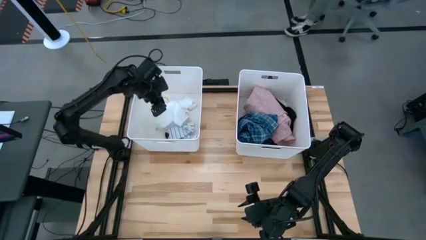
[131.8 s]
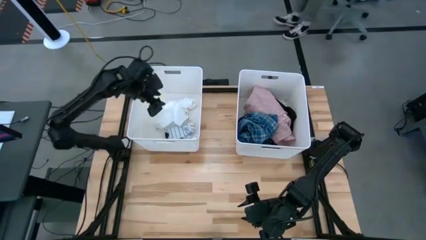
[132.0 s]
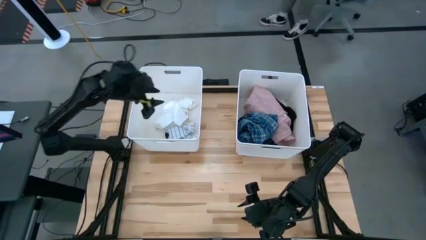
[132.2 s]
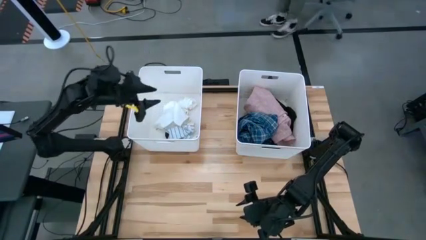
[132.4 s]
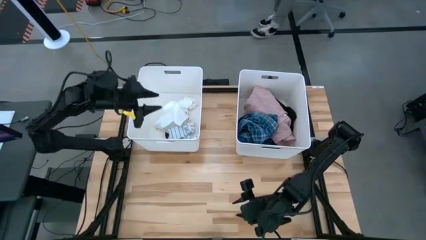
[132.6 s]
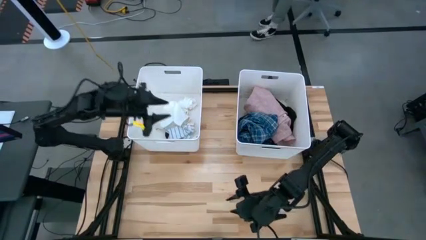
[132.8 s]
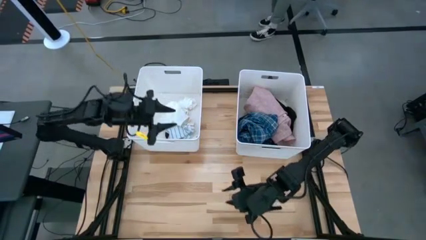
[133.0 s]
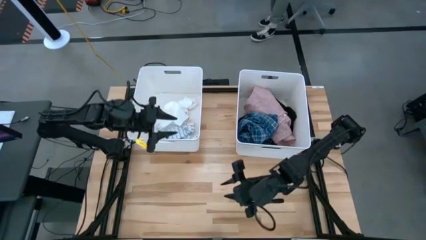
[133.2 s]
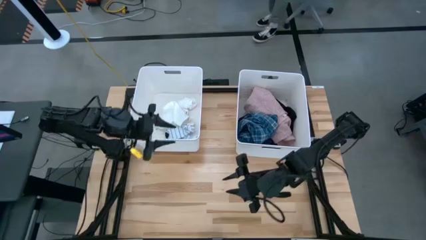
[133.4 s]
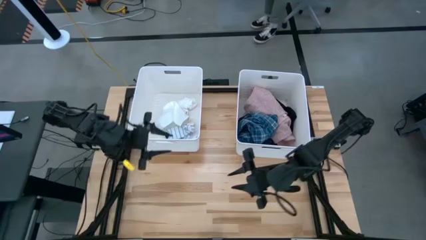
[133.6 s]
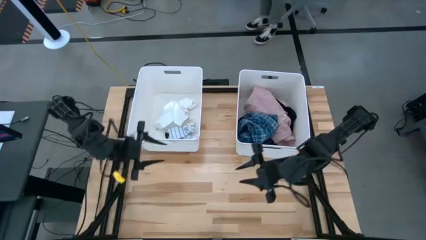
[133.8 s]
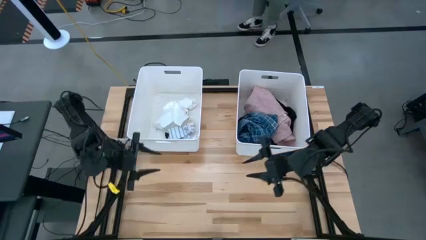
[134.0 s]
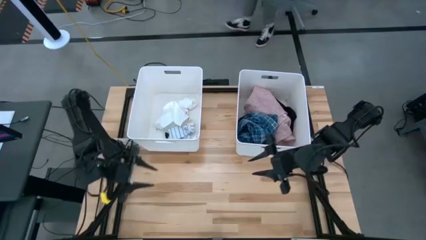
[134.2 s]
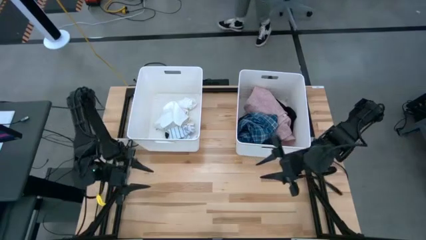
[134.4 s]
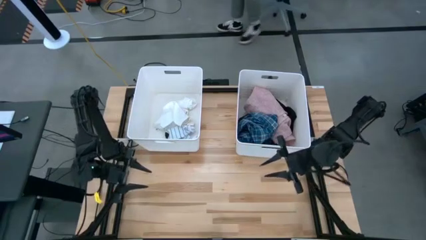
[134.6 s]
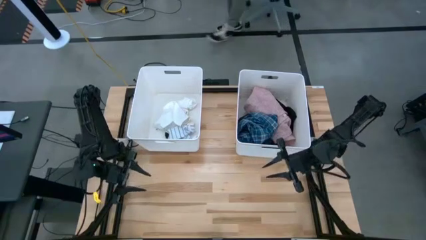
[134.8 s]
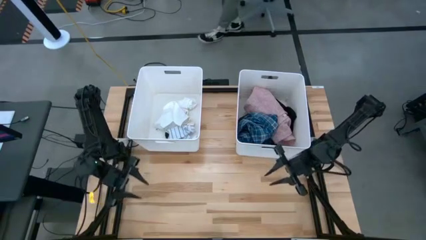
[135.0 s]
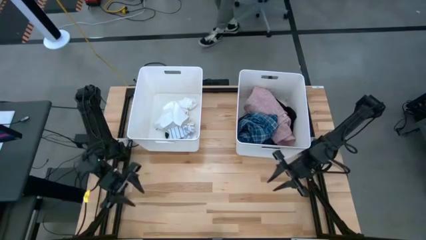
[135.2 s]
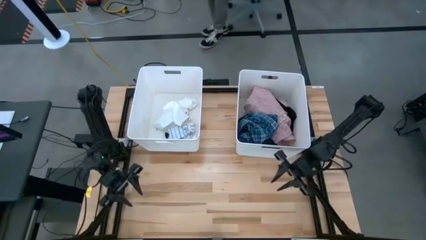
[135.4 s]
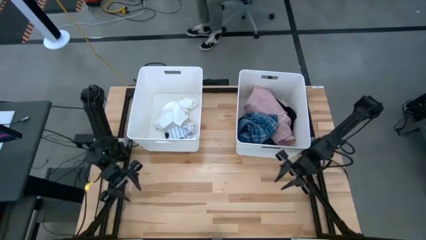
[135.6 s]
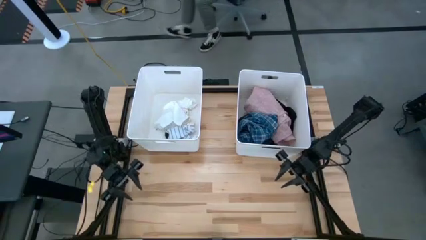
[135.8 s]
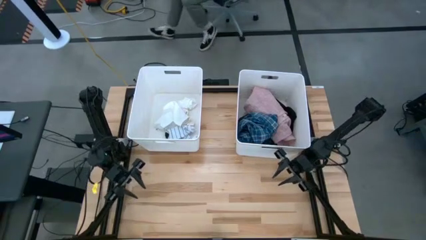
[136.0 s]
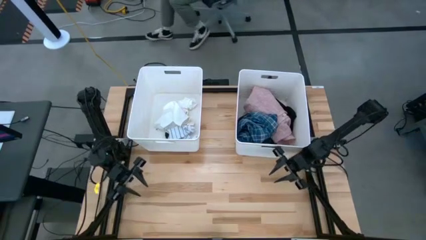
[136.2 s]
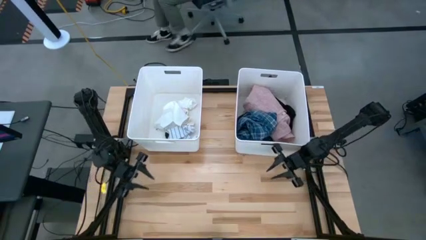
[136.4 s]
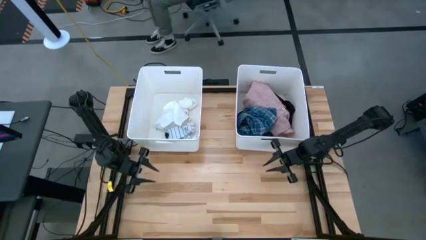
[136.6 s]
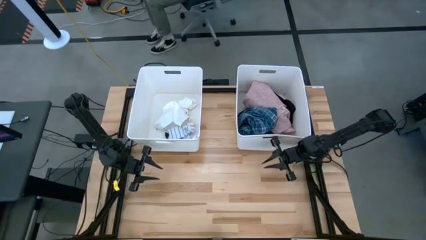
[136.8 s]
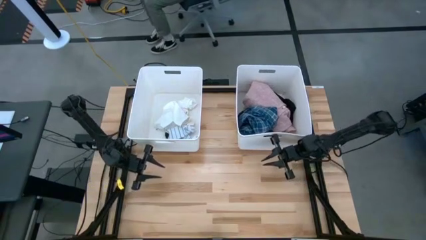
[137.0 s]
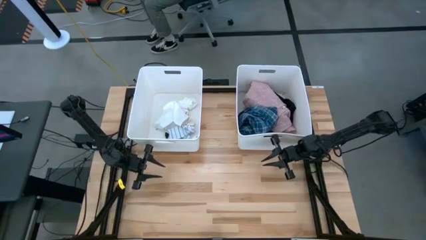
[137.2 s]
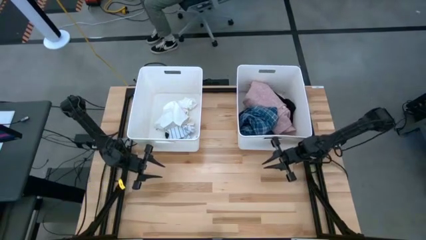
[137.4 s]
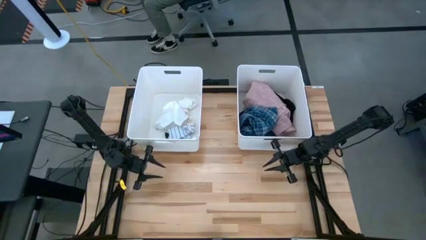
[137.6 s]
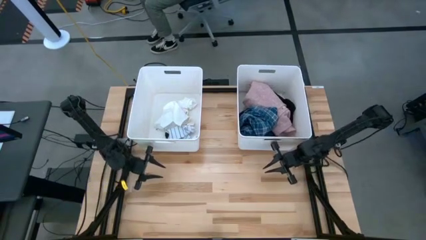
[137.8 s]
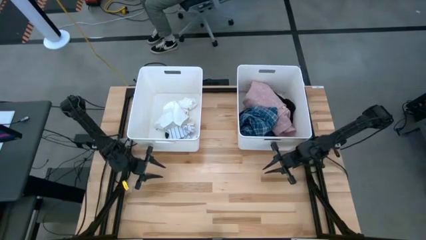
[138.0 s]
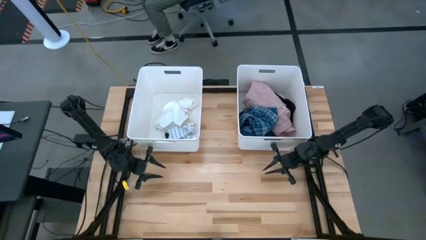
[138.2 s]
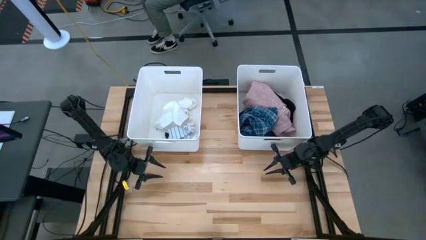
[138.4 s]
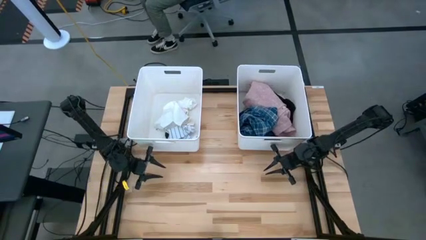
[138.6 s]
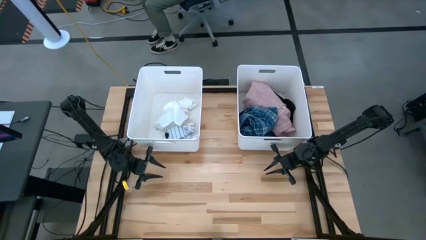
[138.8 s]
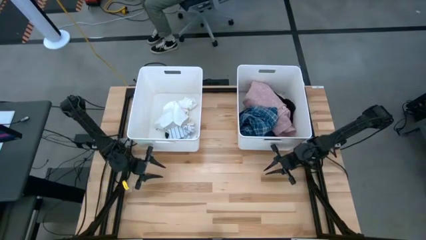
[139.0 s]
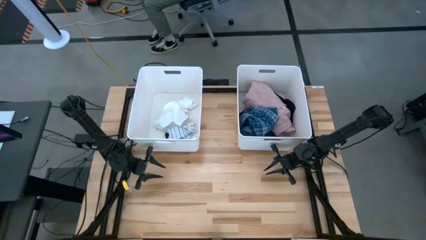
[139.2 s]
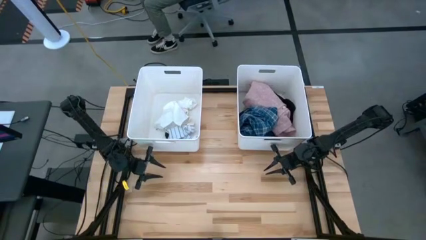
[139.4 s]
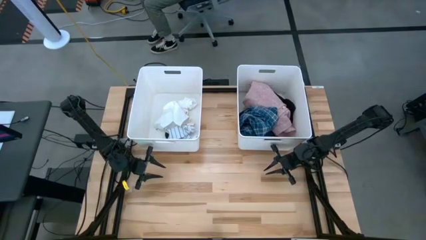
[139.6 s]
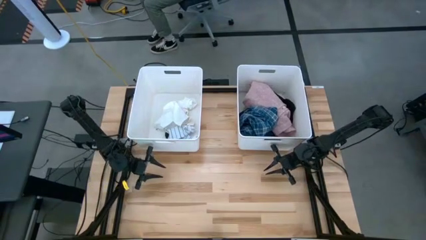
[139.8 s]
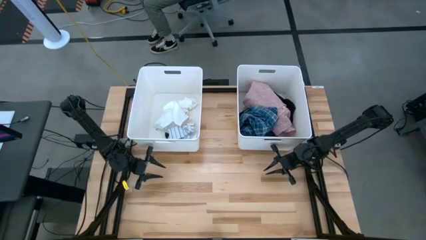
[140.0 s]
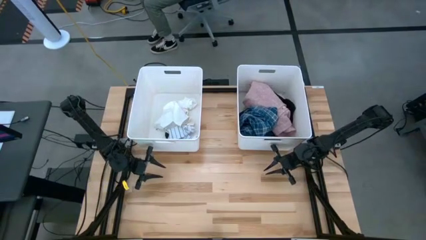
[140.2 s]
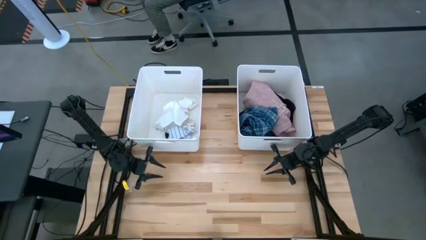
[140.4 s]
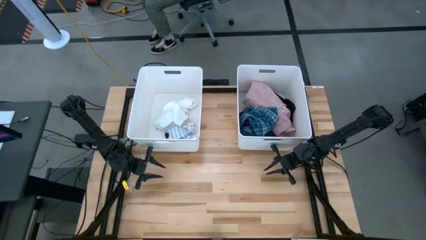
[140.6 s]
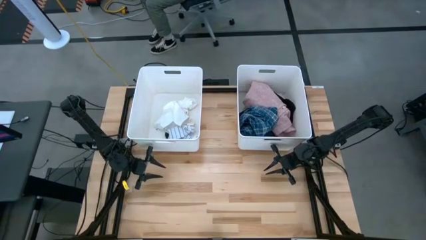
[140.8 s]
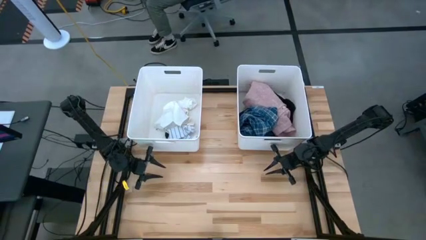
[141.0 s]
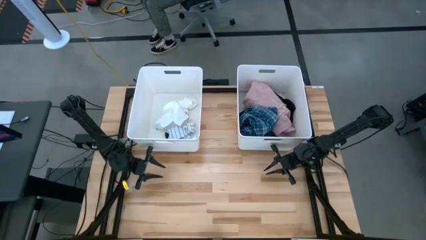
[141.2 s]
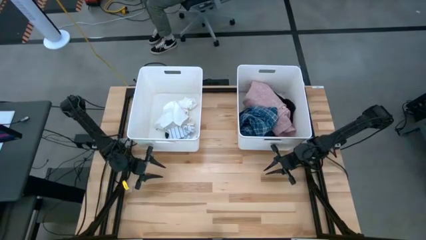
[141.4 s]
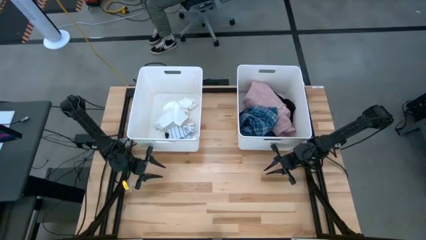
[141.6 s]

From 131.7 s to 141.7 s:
Task: Sort clothes
Return to Home Position

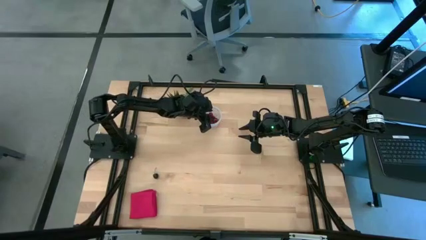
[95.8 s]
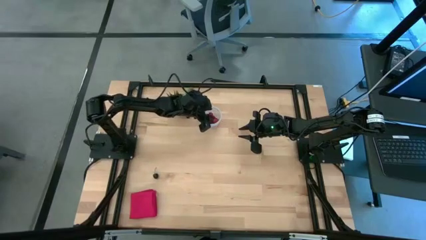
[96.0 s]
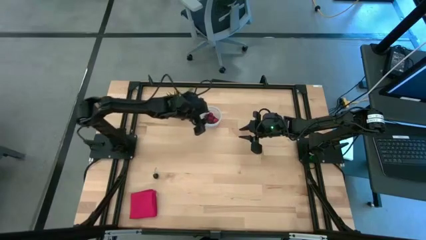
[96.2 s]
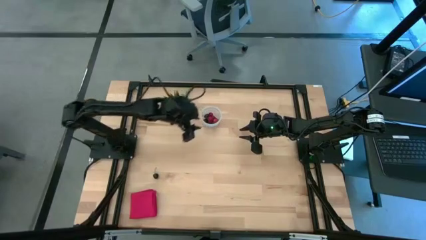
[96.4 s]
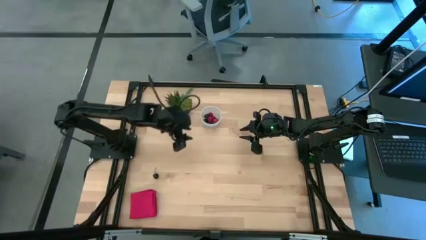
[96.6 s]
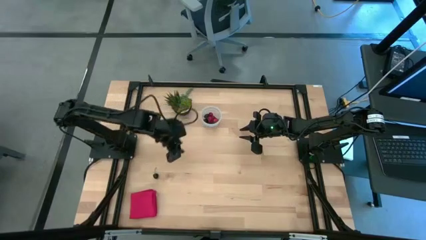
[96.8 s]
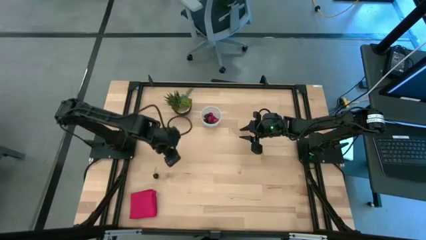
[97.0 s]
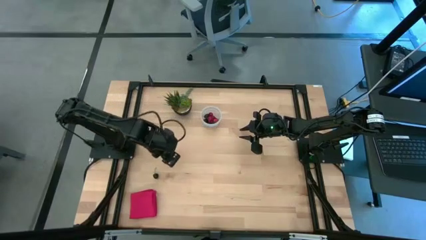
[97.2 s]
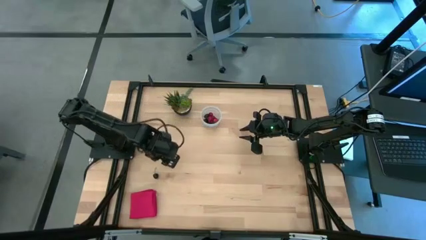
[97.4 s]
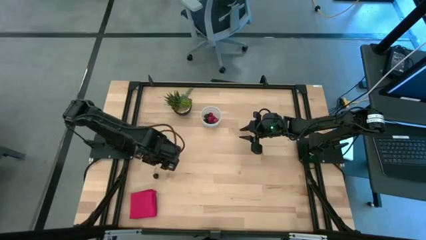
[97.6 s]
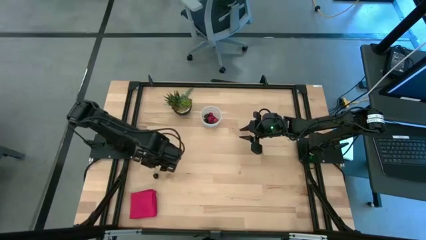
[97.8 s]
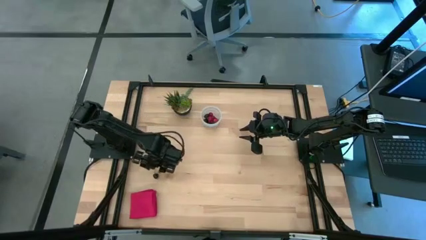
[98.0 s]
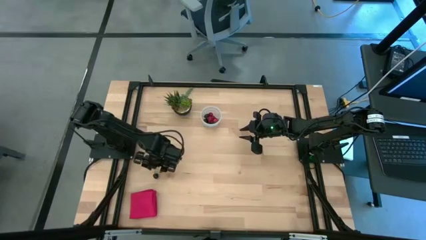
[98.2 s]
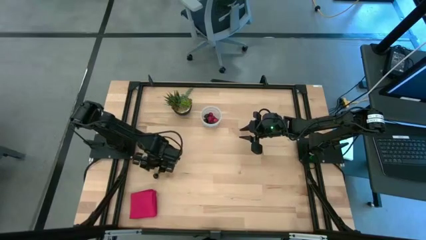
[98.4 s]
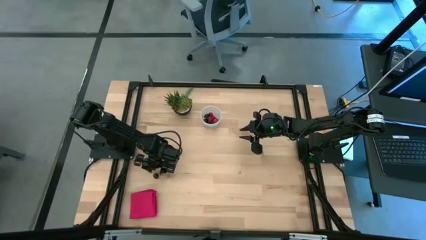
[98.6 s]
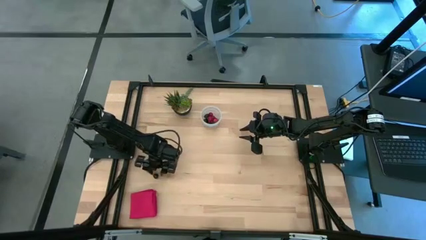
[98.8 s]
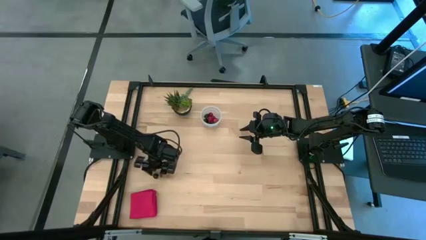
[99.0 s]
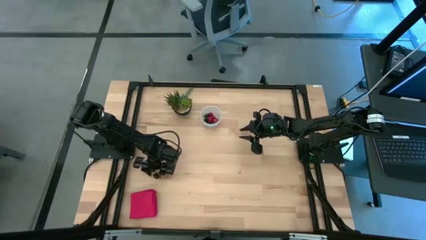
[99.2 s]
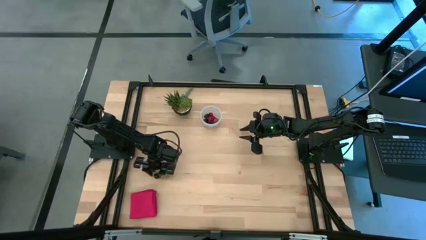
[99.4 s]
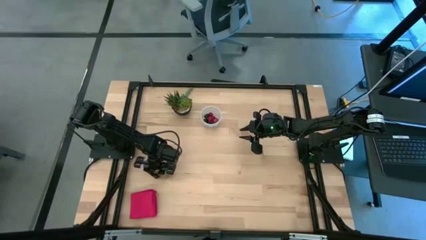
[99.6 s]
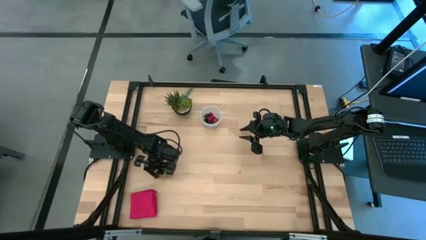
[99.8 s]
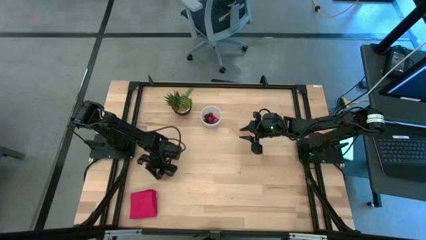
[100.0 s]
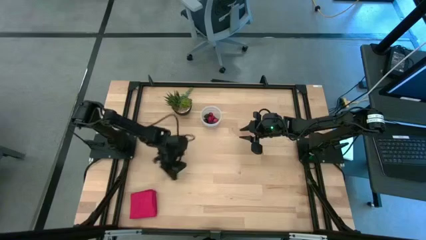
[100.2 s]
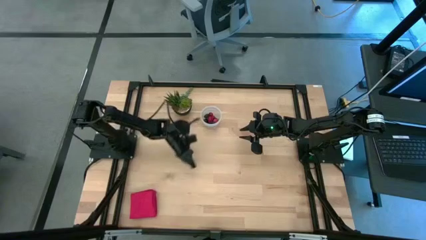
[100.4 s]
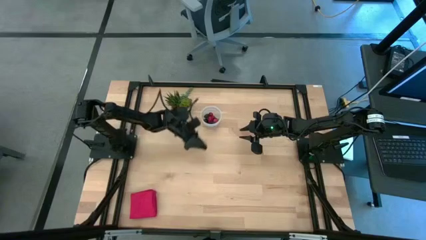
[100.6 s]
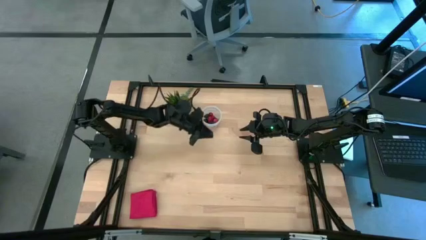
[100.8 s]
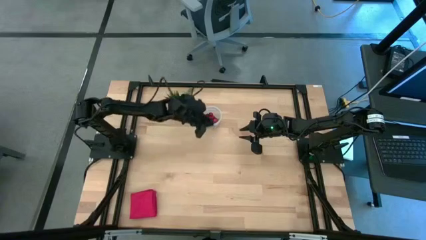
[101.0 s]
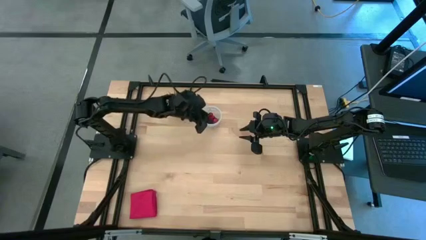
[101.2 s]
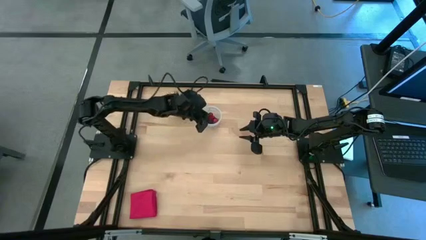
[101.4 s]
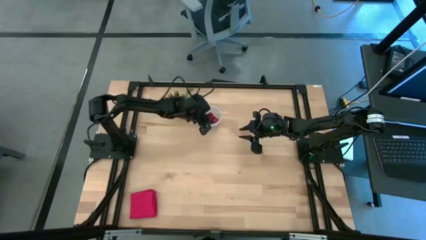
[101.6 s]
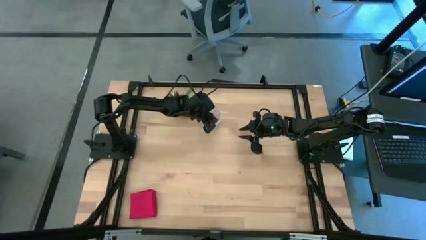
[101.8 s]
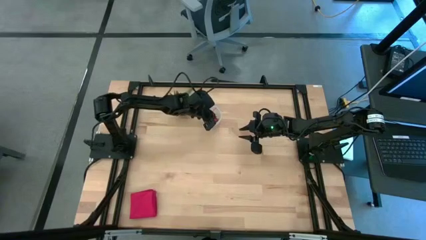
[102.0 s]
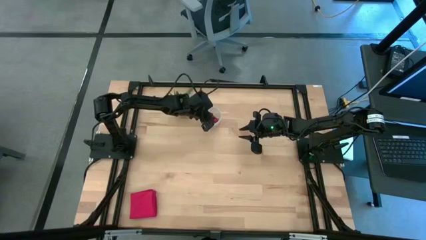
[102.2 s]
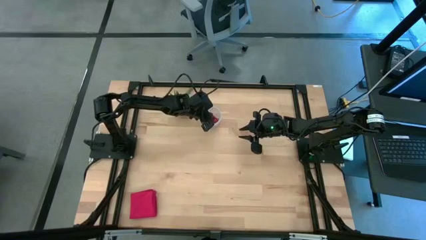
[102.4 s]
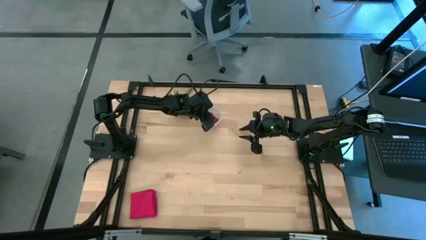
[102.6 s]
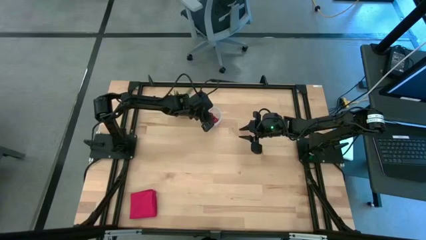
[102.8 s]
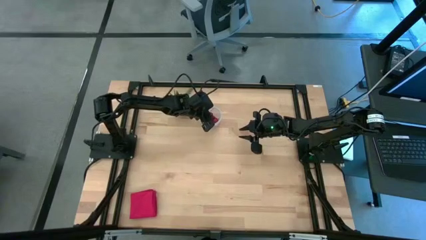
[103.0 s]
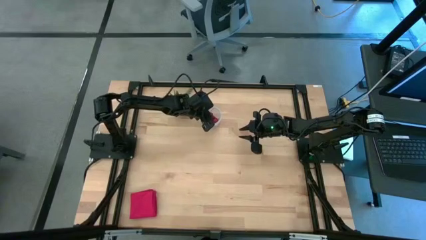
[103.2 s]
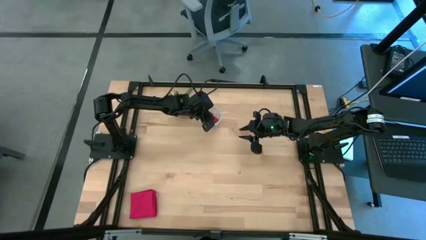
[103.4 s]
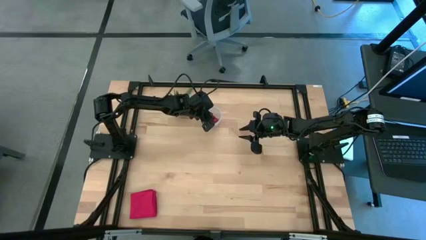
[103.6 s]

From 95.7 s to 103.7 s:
Task: Pick and placing Produce into tupperware
Put the black cherry into the transparent container
